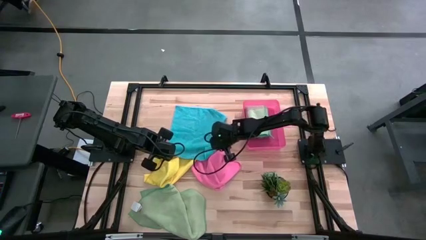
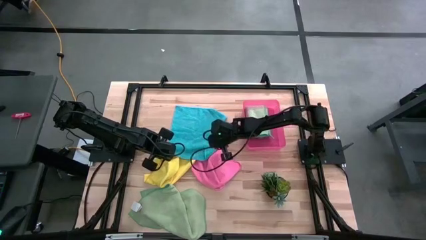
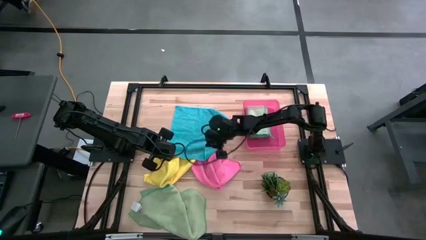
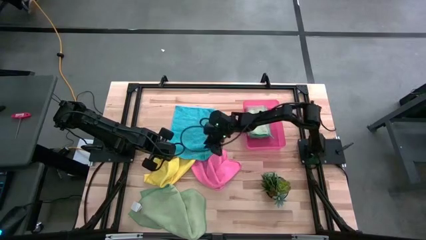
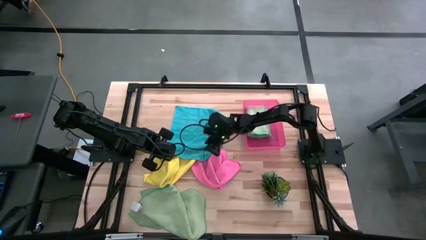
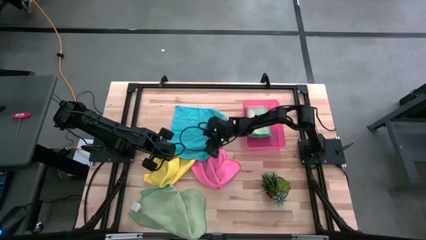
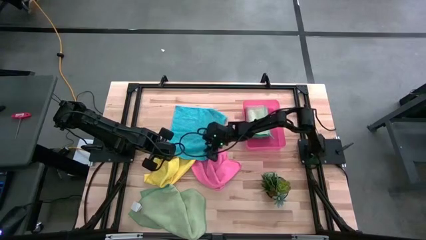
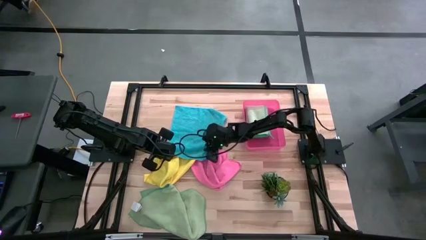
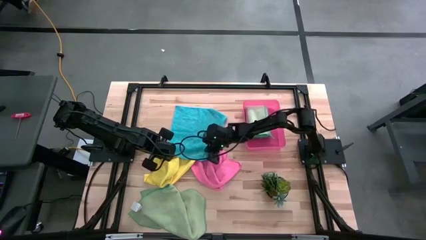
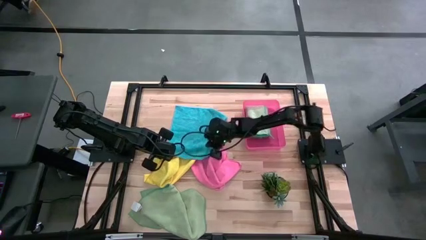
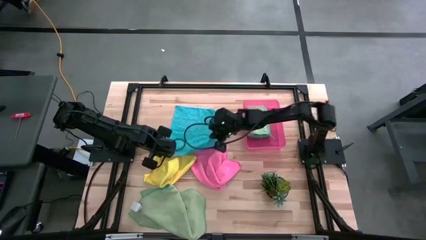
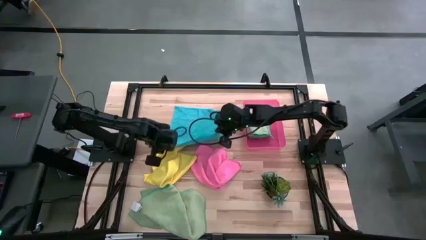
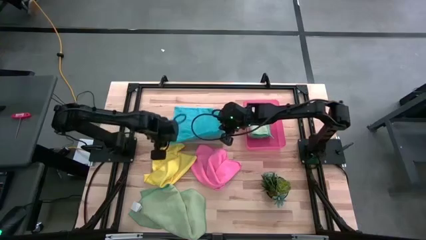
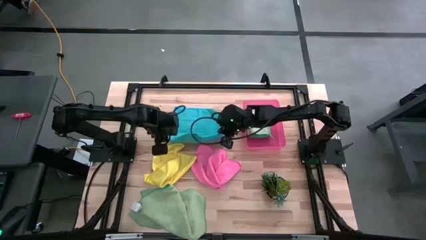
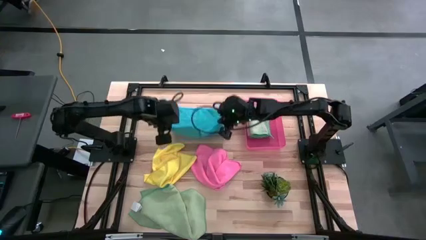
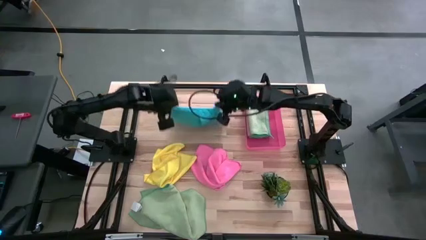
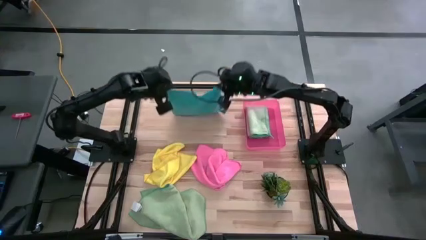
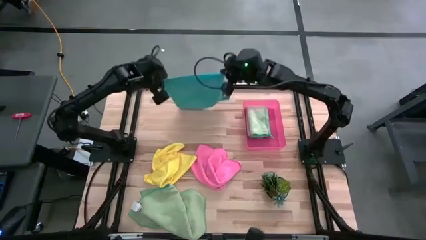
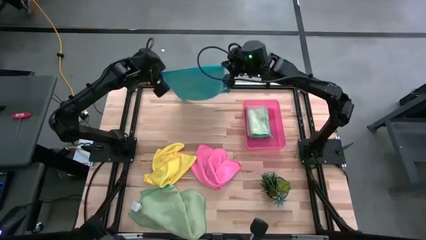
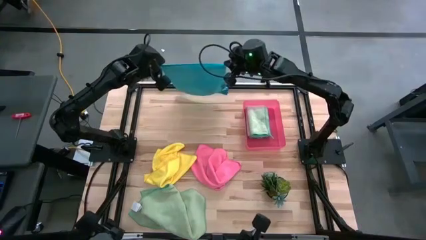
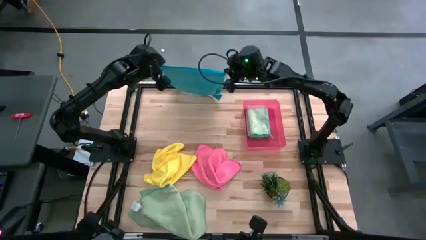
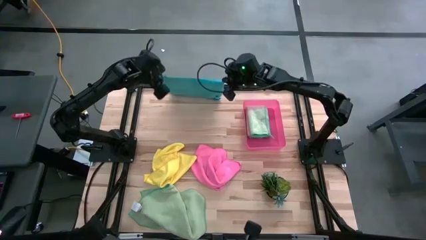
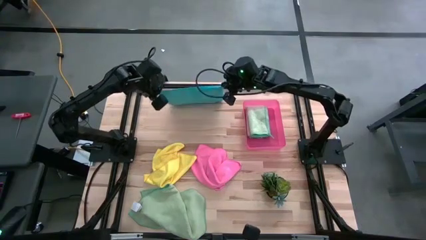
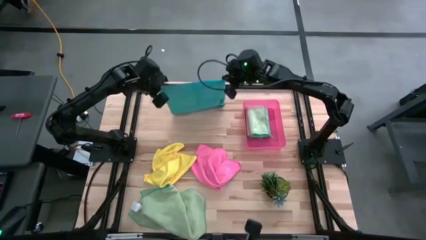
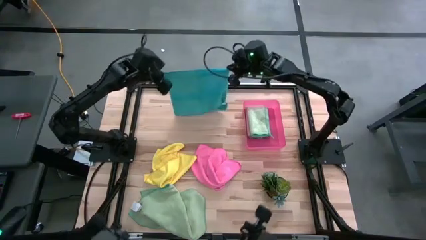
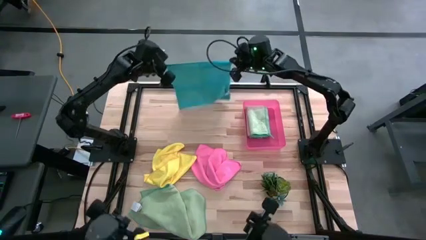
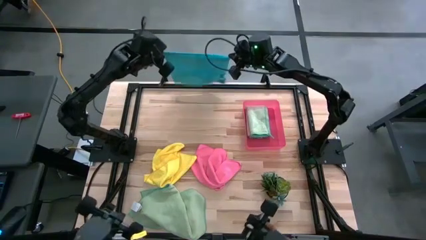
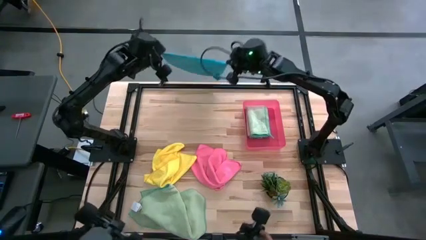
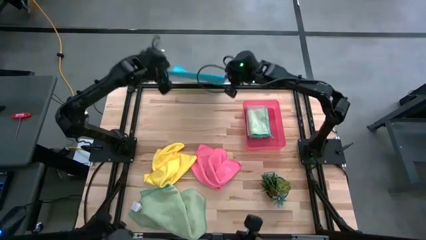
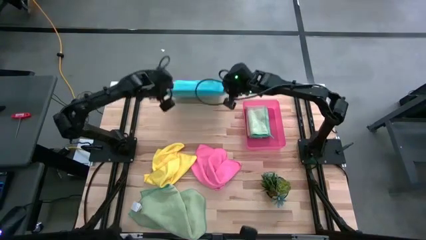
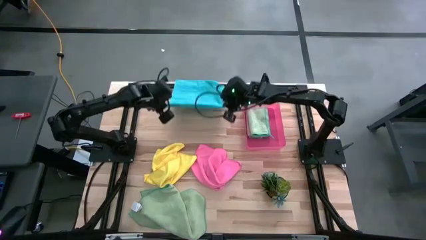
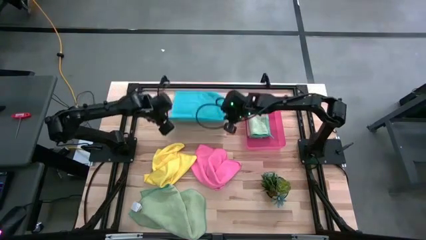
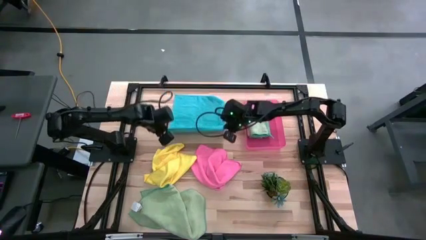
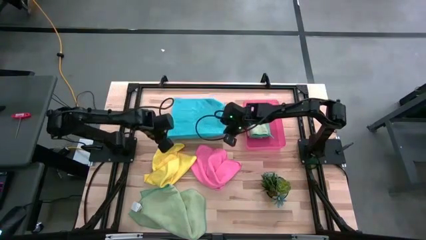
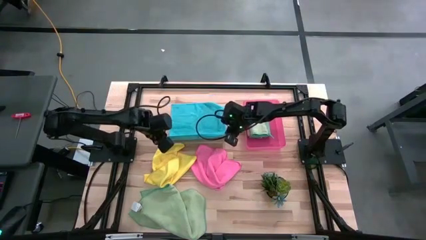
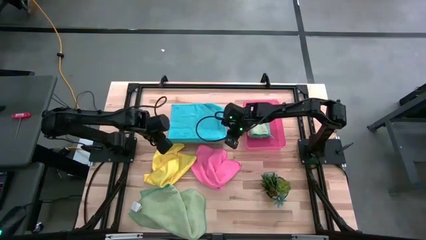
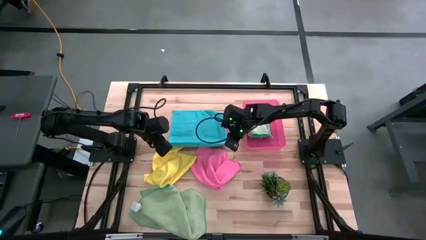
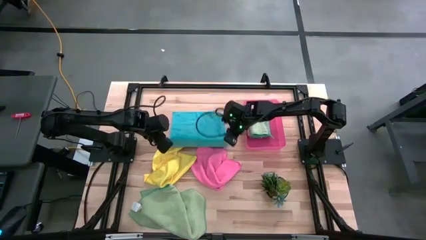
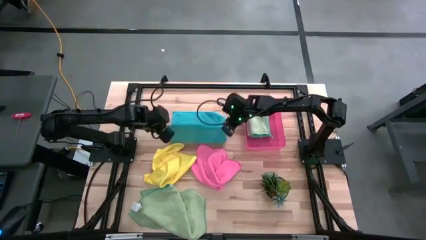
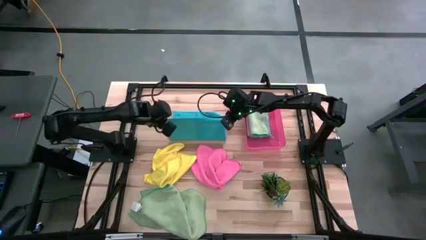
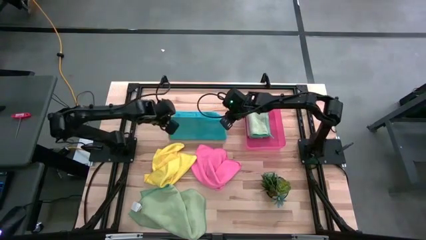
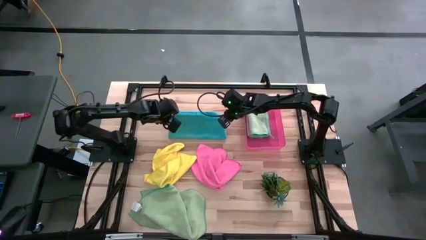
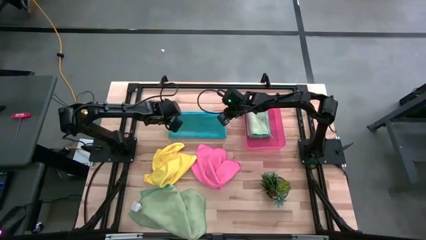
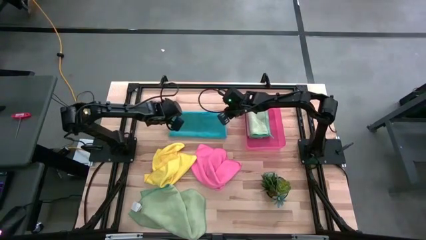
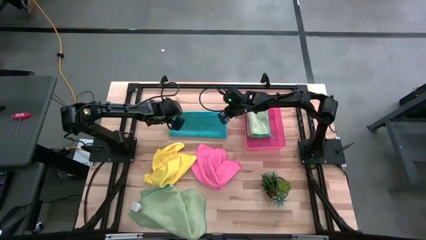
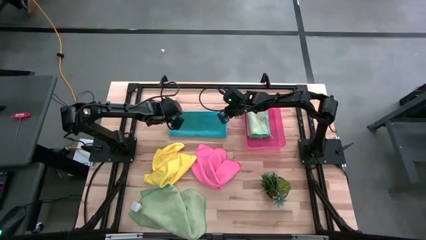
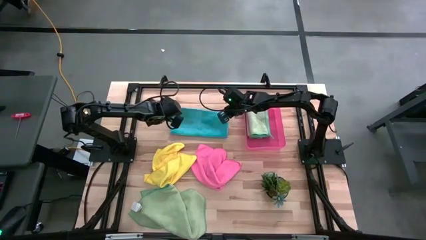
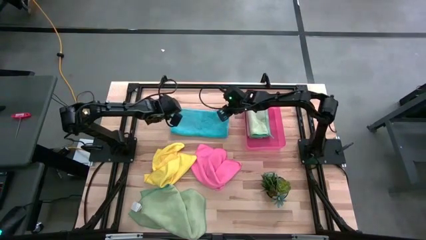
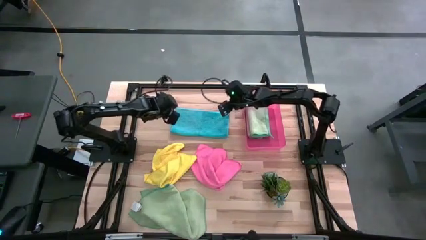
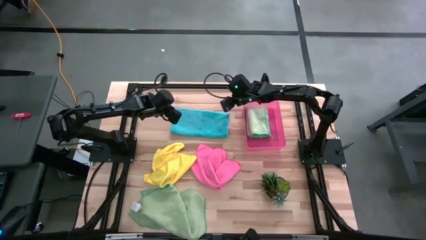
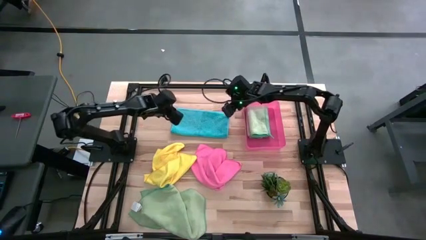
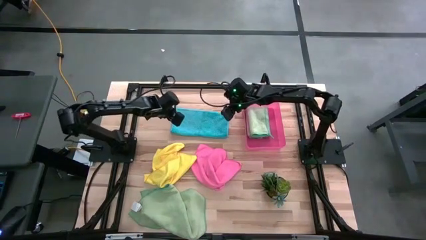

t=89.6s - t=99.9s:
Task: Fold microfiber towels
Fold the blue microfiber cloth

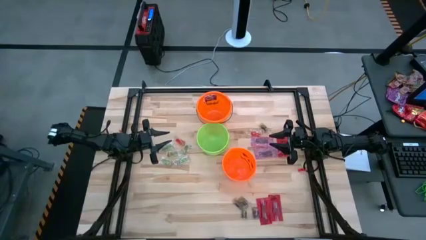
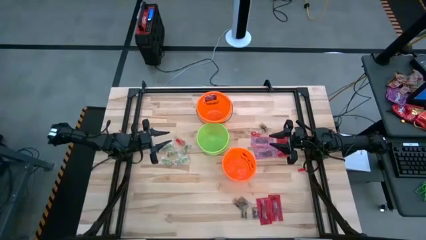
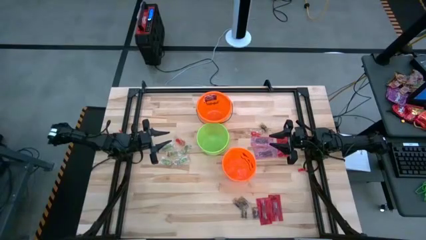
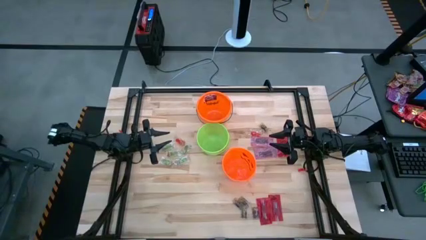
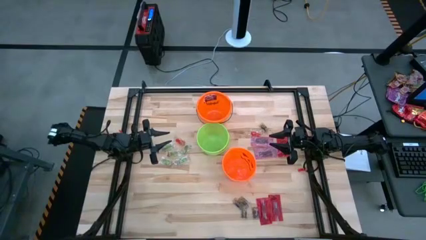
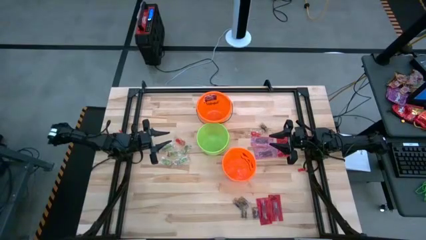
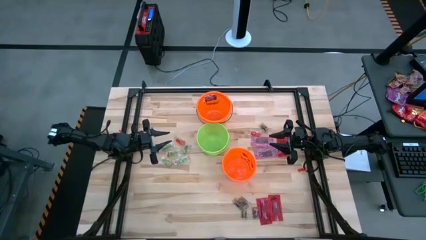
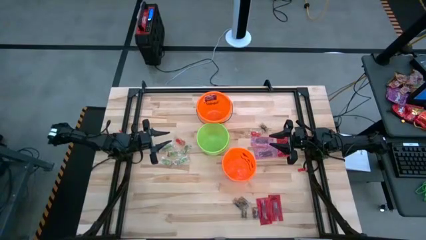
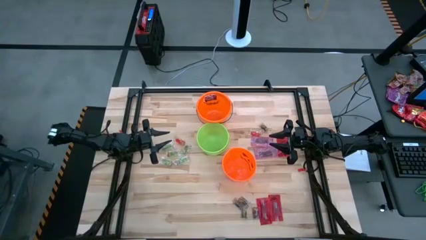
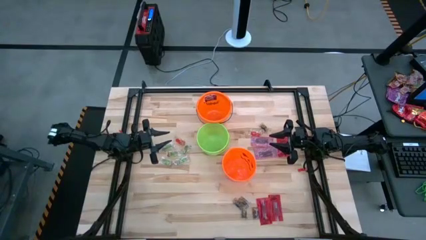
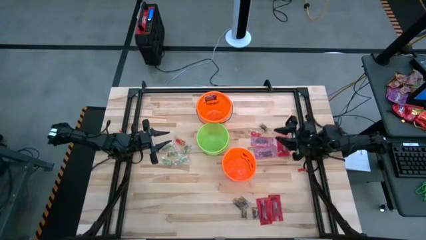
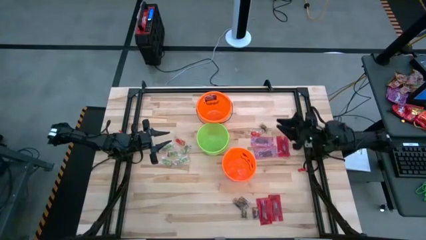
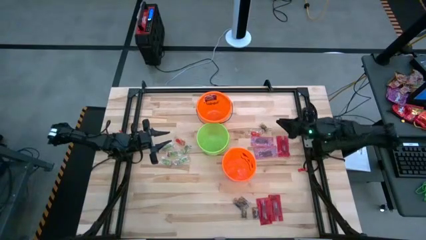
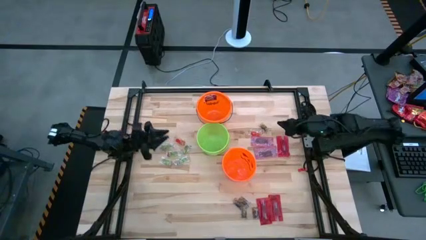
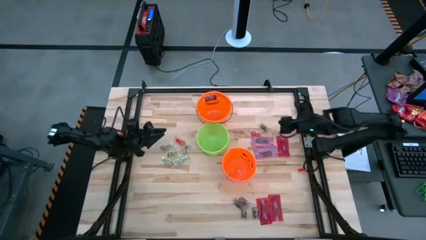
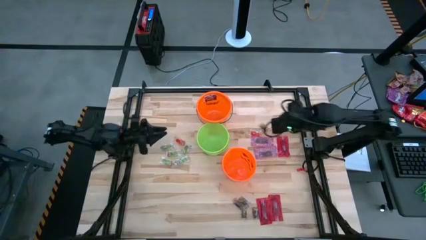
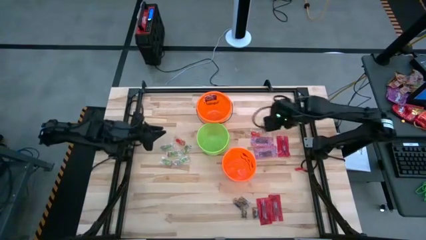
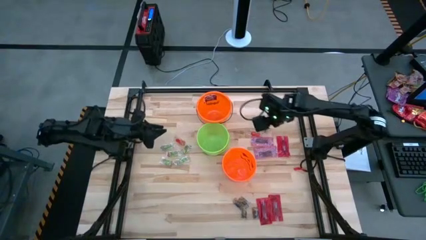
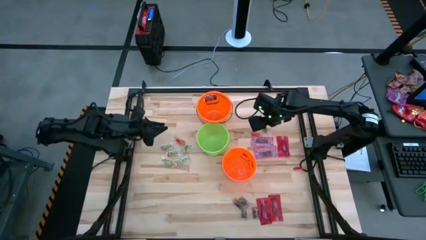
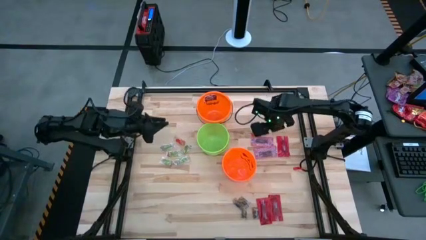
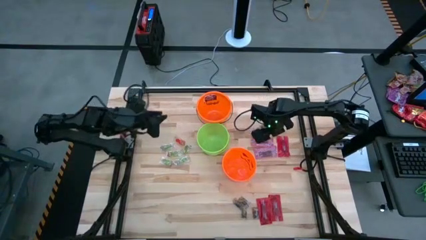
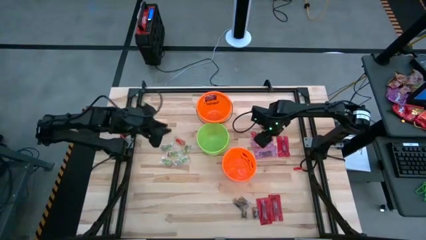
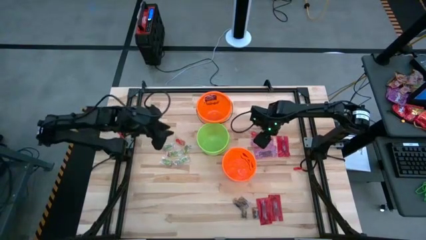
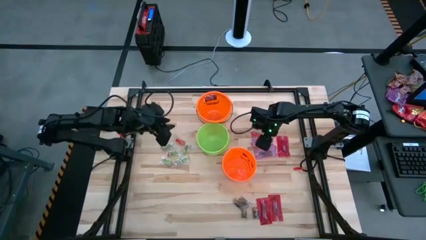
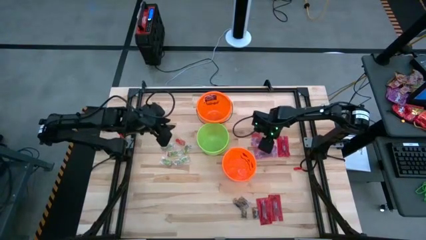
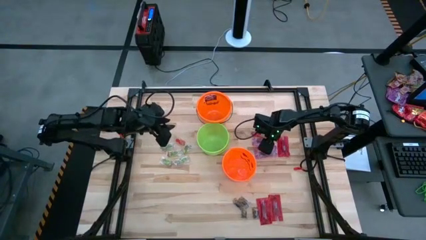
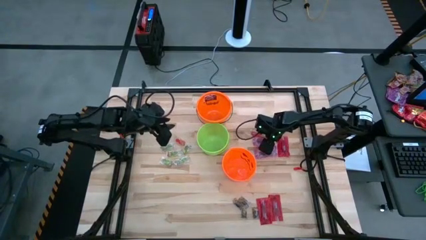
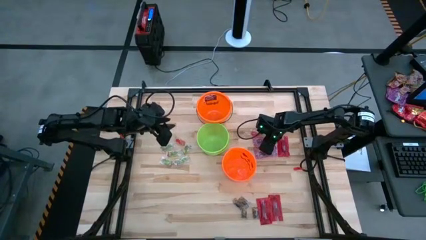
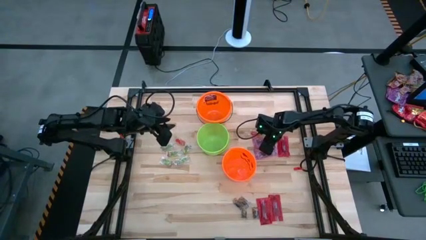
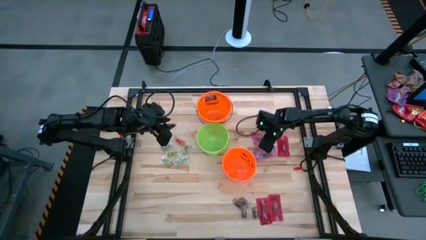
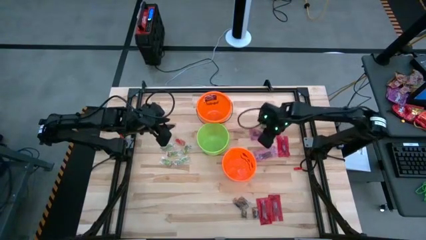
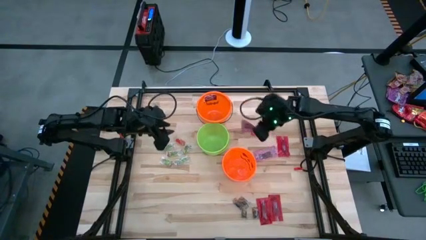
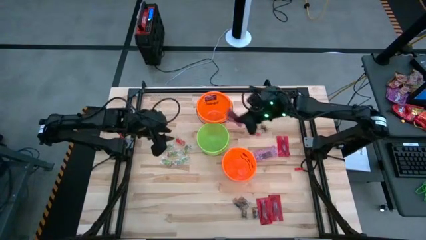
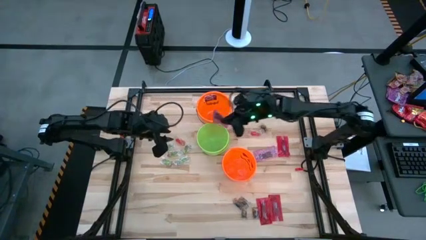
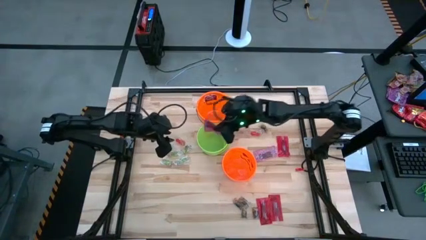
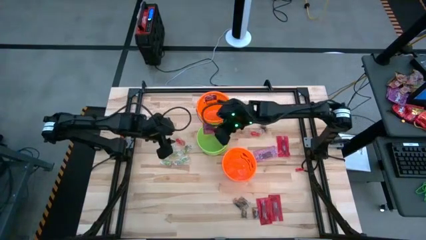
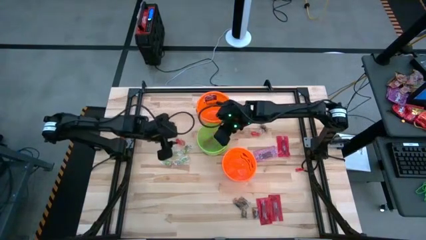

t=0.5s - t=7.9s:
Task: Sort candy by brand, put in halloween buckets
Put the red candy into the green bucket
